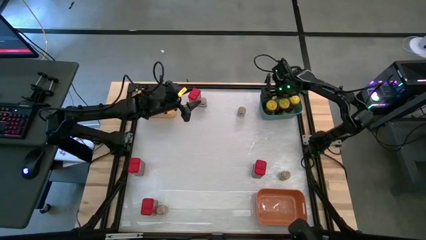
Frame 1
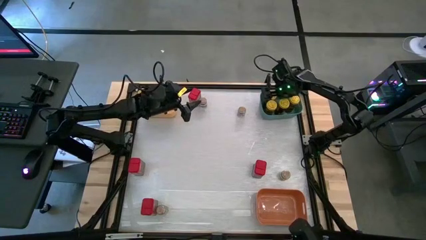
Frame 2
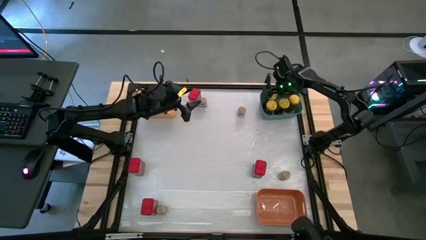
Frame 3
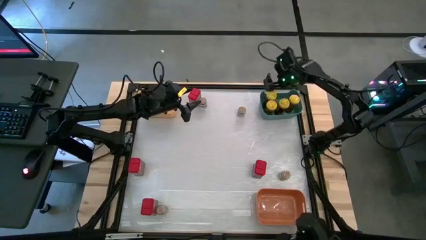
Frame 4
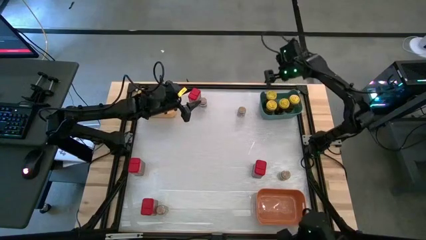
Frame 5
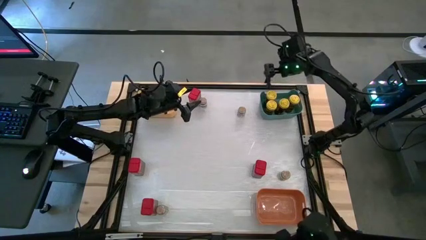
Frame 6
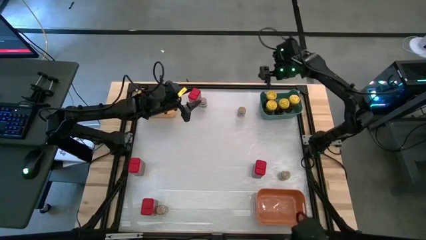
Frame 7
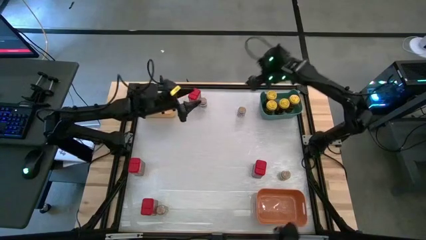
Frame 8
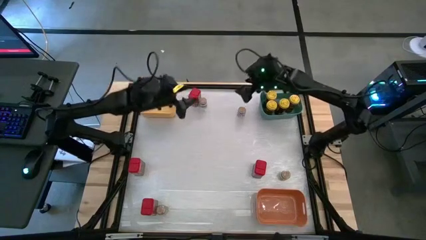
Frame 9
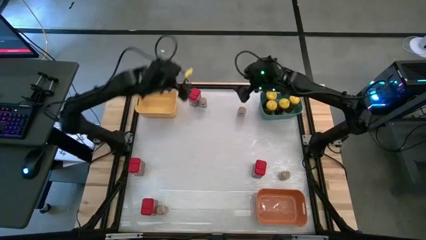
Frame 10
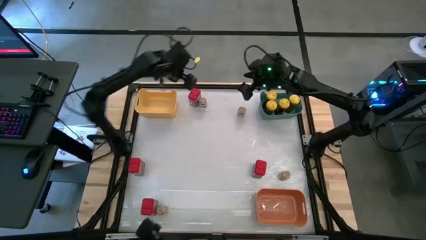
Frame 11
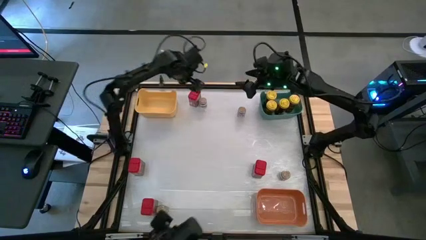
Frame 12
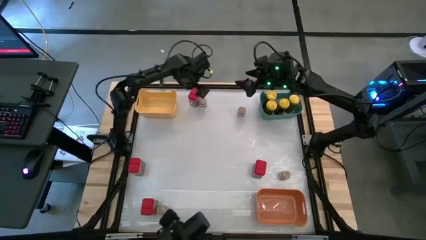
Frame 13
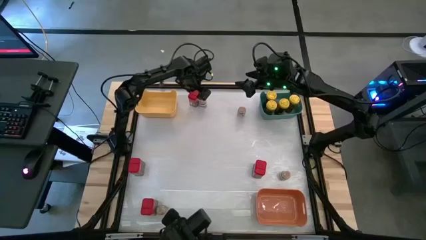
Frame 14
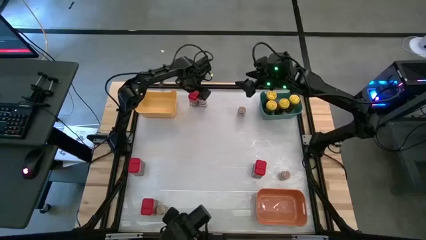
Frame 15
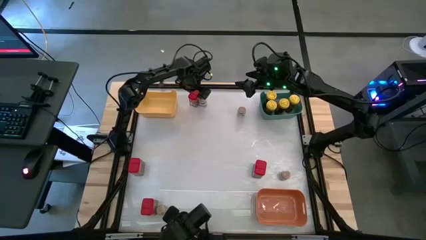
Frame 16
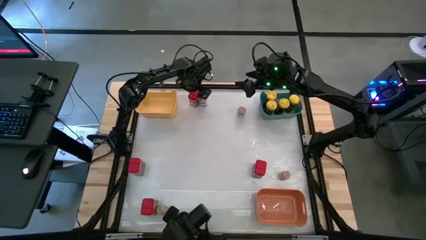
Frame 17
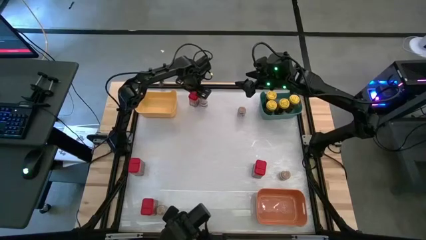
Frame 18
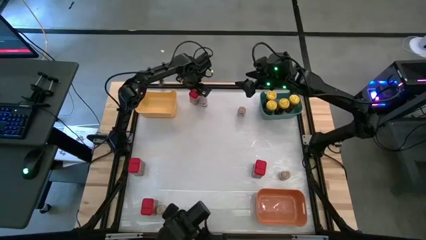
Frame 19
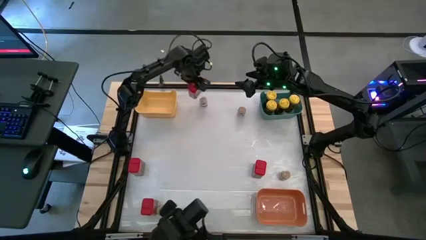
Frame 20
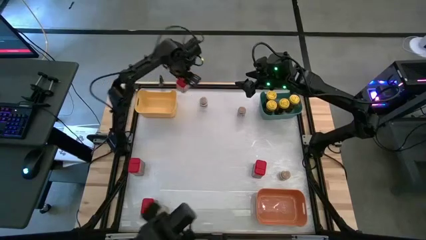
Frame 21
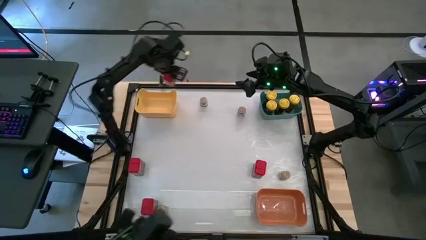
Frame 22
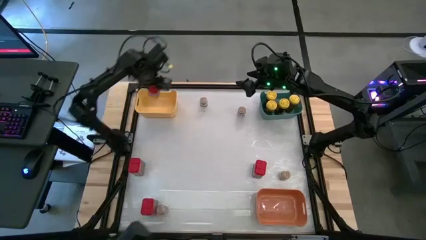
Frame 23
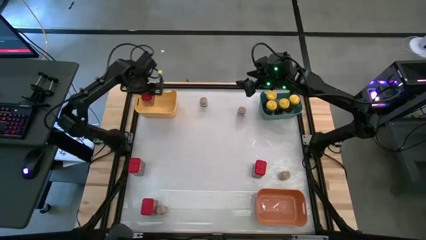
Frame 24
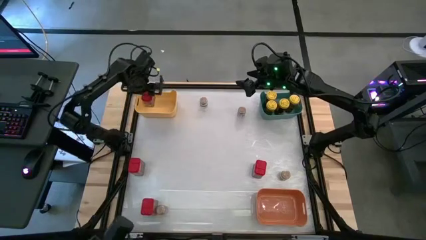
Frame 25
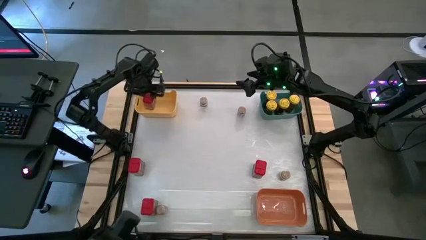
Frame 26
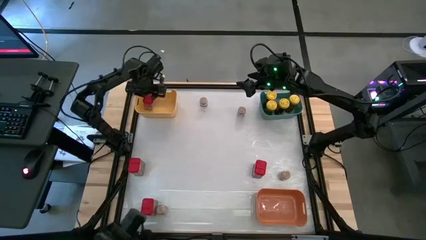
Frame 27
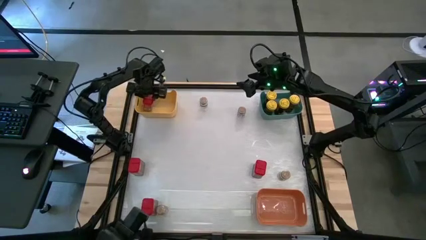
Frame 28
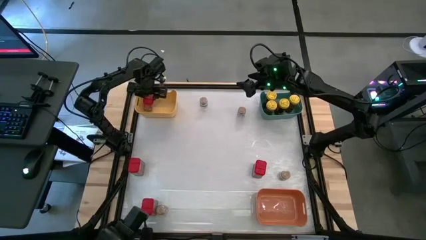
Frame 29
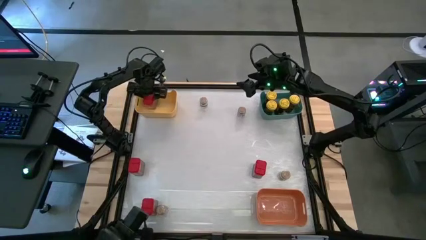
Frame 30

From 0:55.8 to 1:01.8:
Task: Sort spices by type
Put the top red seasoning can into the yellow bin

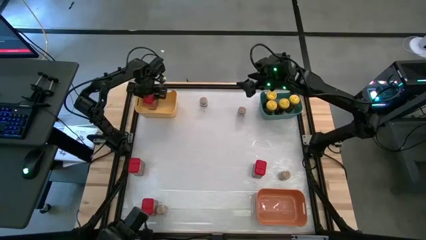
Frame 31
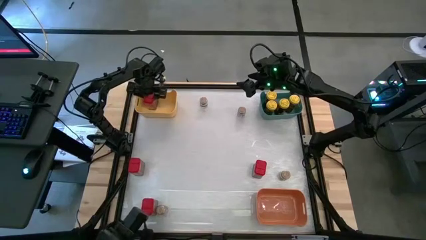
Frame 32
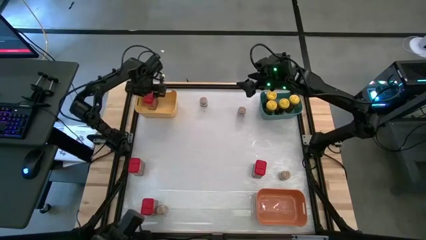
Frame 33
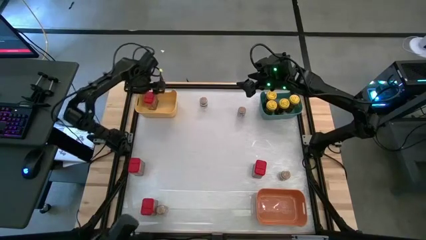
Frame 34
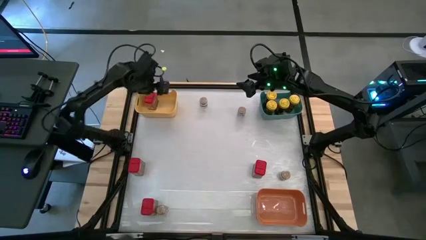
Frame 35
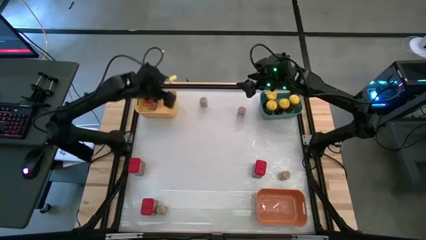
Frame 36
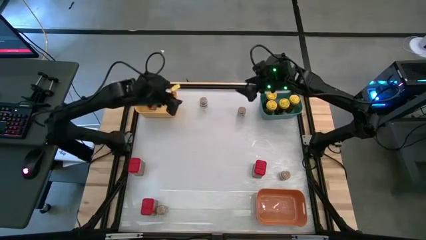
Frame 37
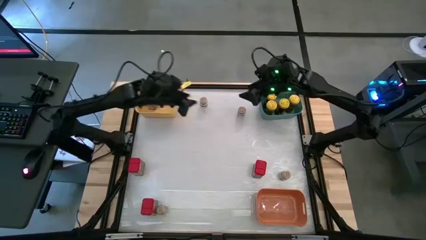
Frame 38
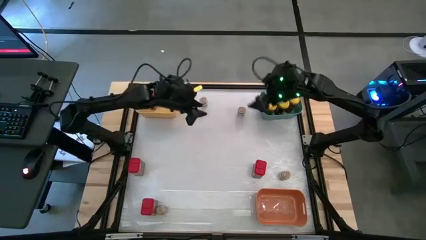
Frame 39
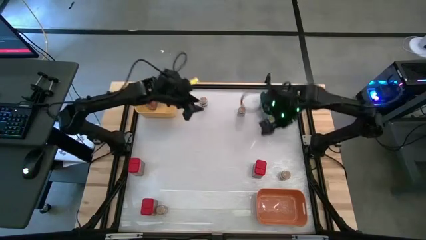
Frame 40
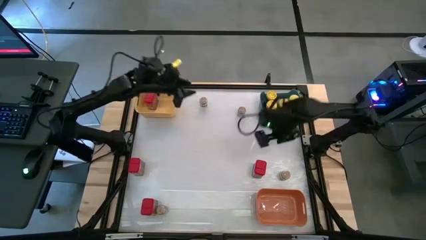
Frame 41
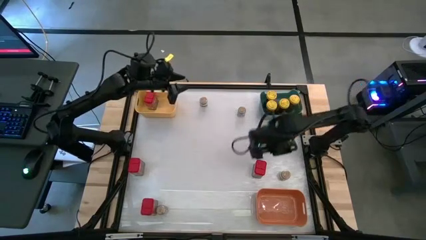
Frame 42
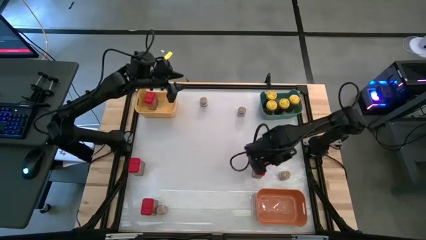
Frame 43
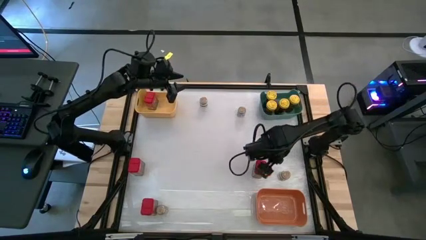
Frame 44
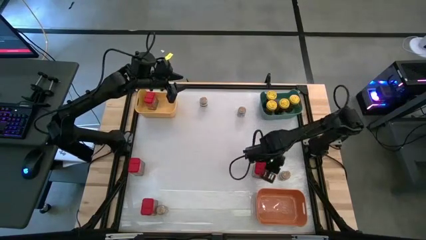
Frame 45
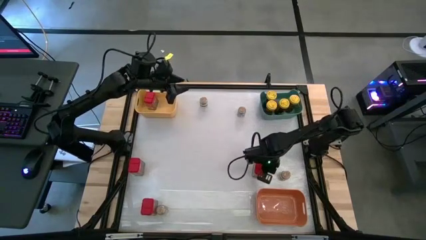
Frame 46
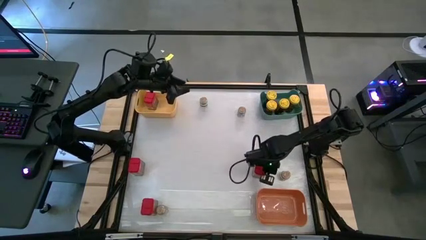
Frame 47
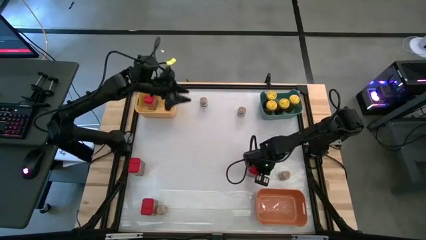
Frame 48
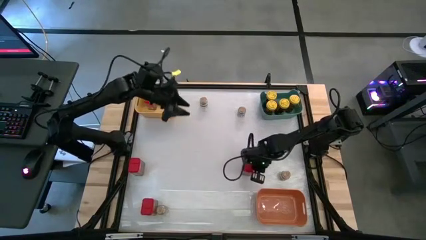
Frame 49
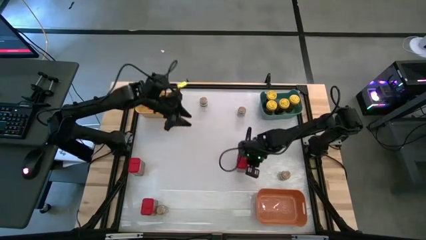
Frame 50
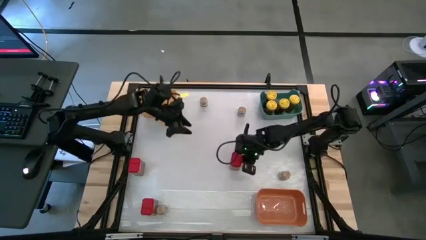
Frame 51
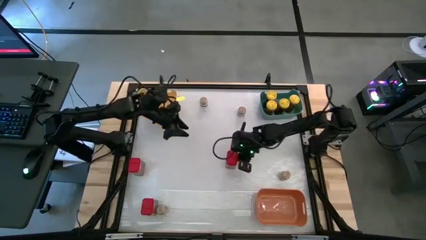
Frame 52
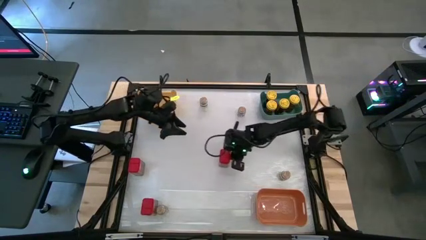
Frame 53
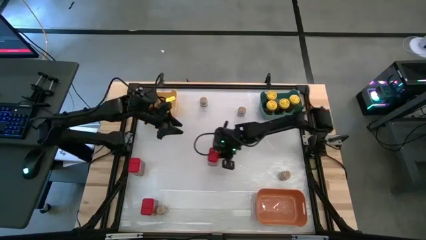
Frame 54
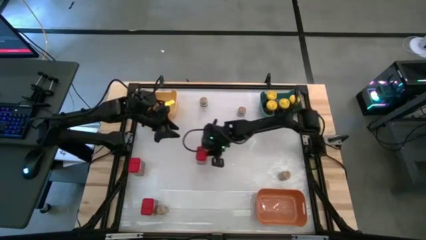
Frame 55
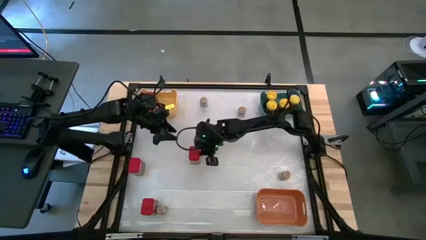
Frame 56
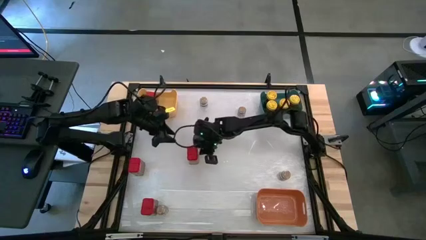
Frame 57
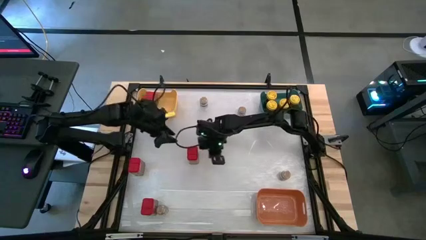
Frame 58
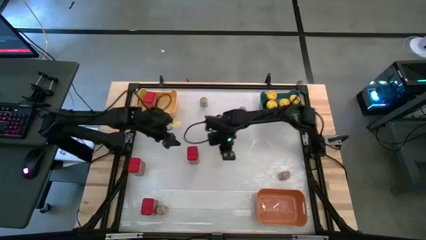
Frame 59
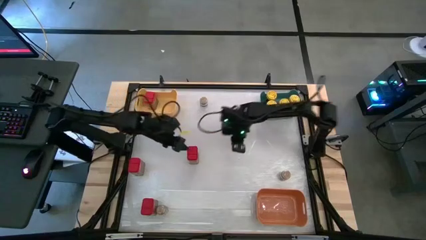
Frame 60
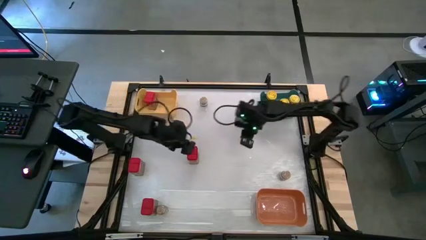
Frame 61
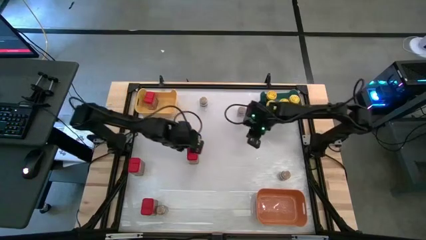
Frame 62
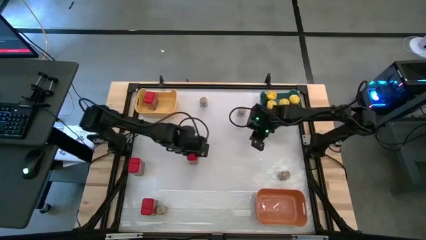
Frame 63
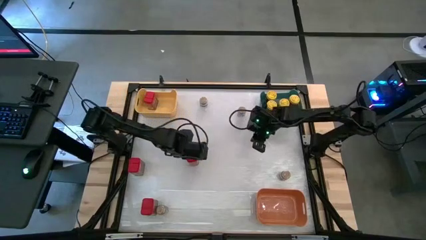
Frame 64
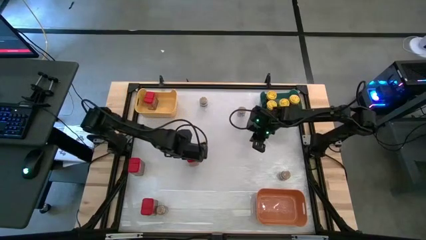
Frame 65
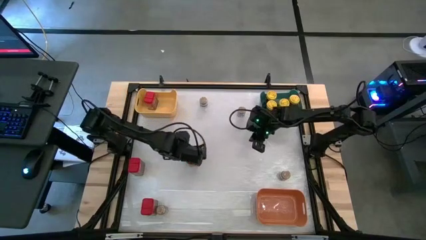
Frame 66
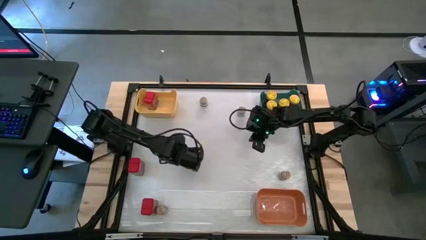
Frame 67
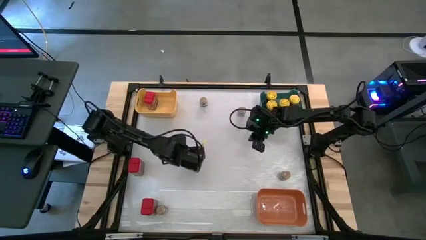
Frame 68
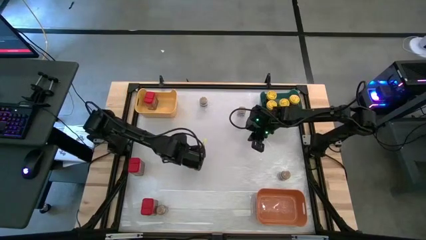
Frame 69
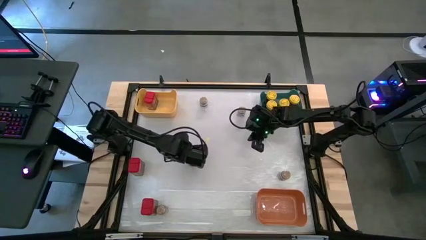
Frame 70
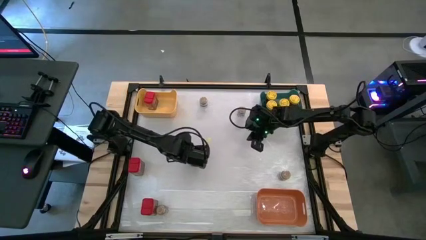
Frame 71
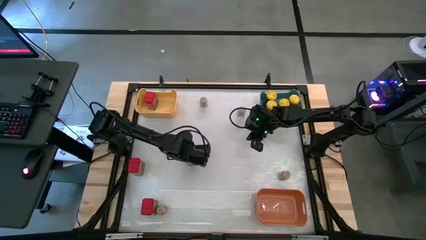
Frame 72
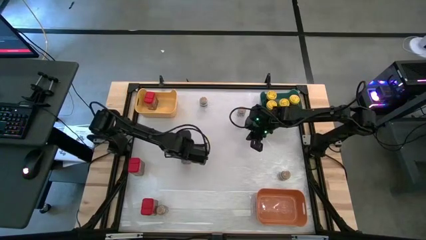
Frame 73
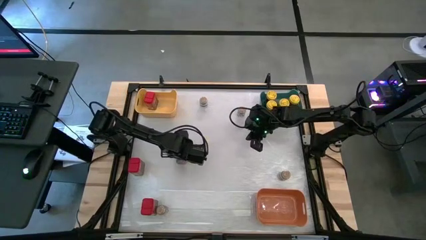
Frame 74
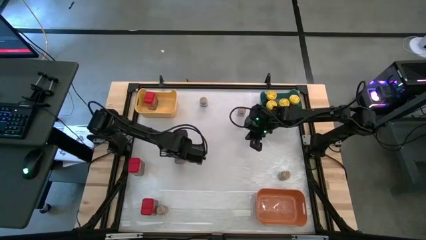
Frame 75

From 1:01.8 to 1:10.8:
Put the right red seasoning can into the yellow bin

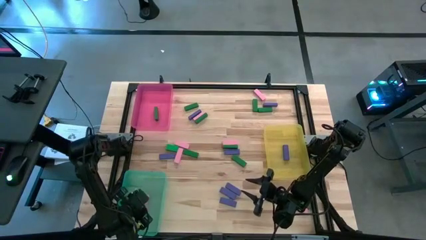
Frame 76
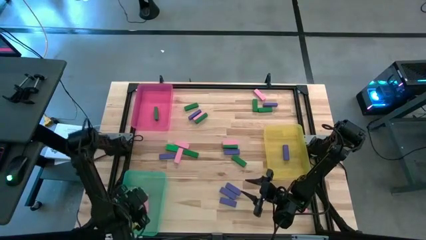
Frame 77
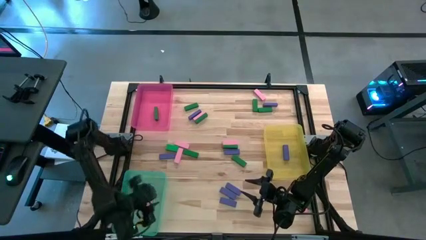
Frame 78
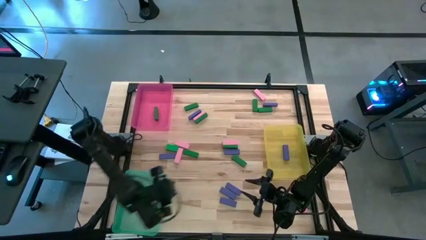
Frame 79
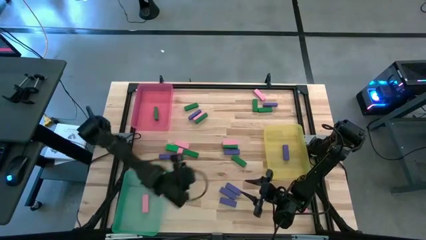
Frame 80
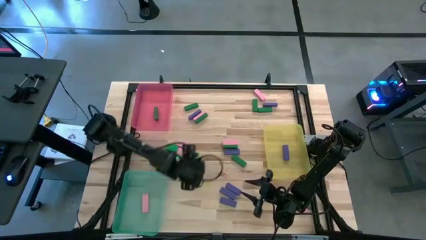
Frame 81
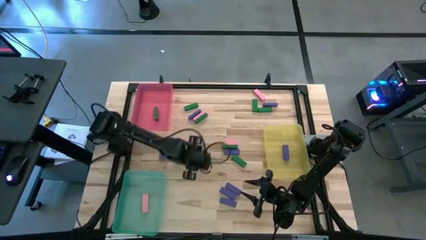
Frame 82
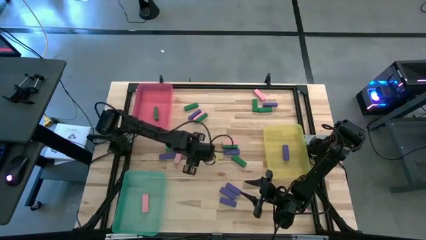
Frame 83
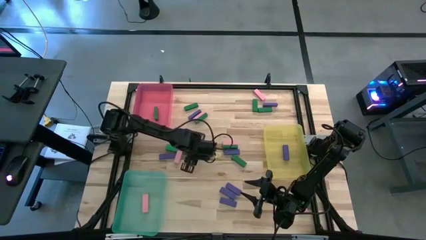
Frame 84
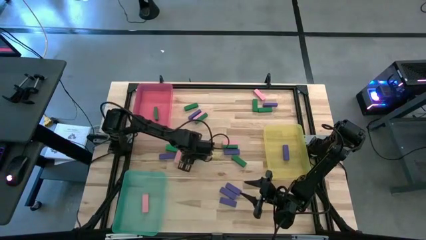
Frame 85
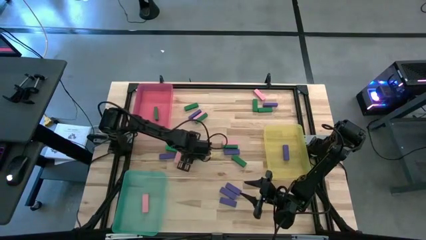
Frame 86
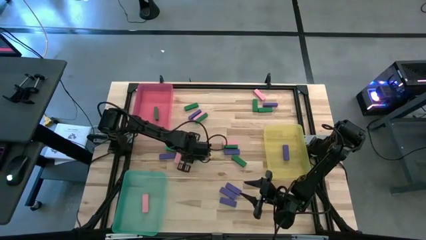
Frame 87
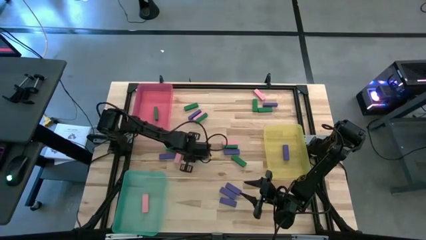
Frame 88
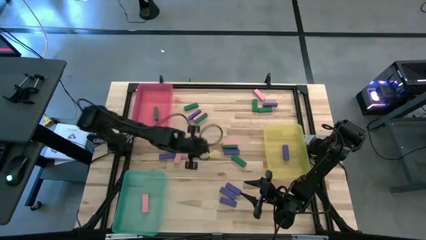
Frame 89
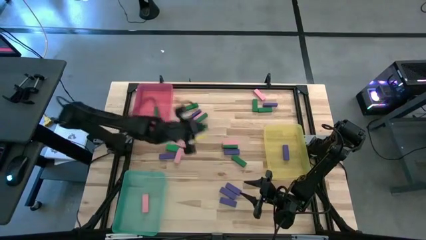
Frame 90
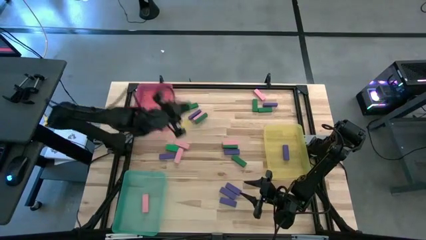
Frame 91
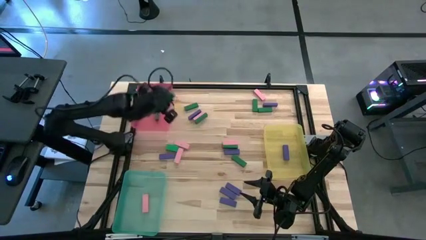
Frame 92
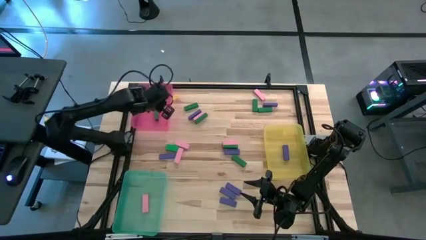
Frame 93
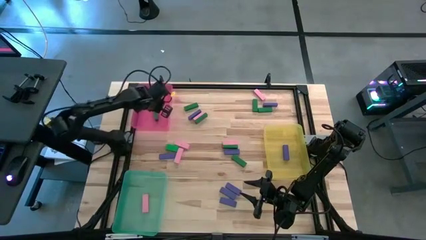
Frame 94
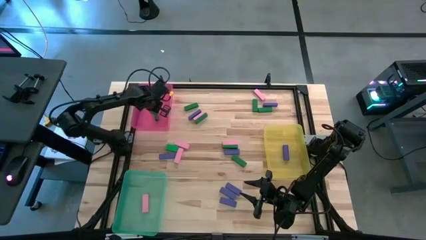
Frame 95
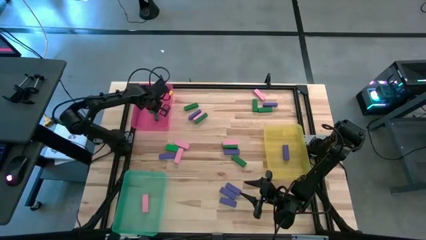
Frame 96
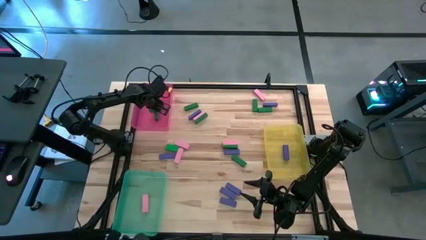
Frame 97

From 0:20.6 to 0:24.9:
Task: Sort blocks
Put the green block into the pink bin
